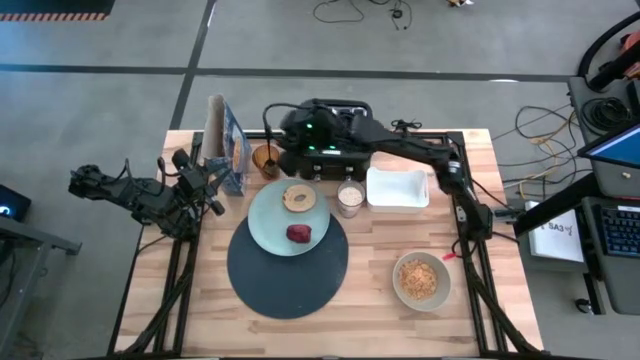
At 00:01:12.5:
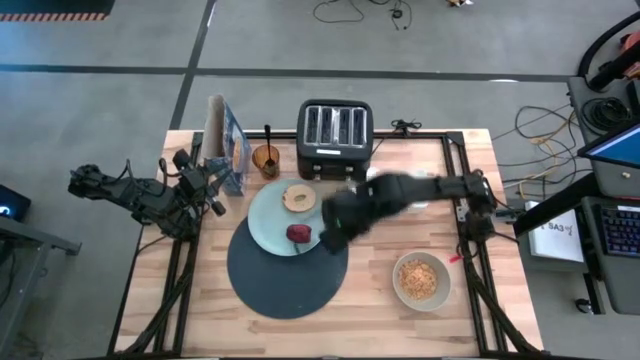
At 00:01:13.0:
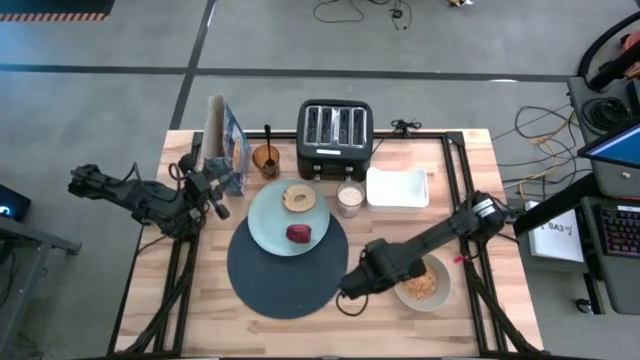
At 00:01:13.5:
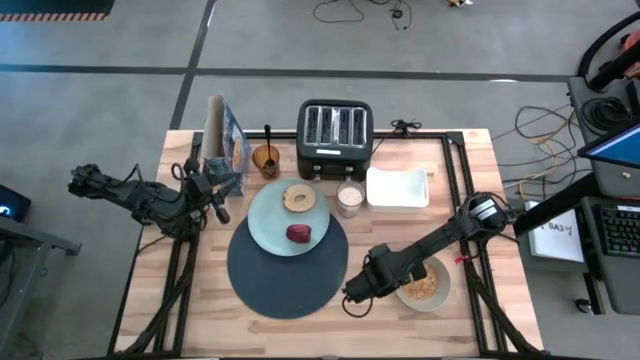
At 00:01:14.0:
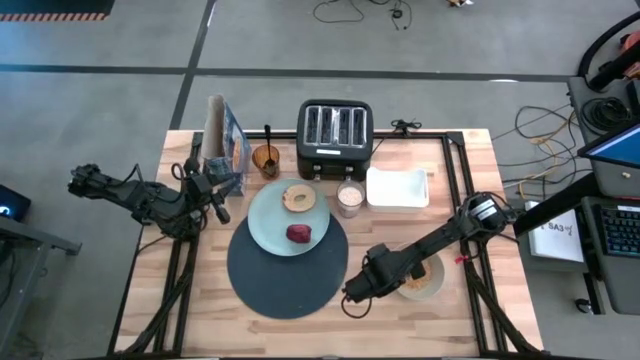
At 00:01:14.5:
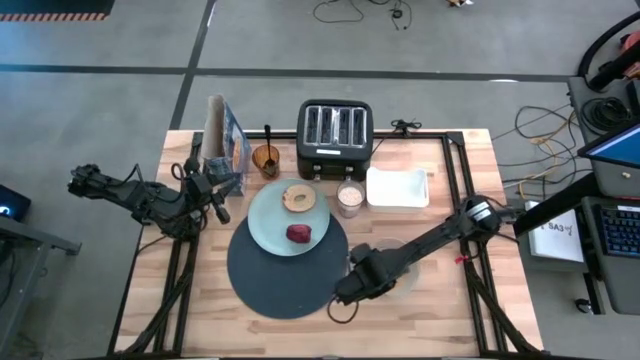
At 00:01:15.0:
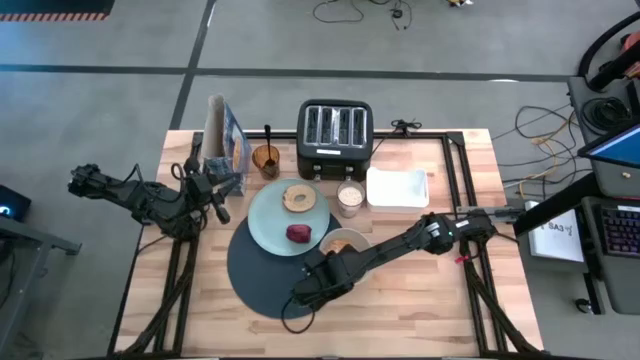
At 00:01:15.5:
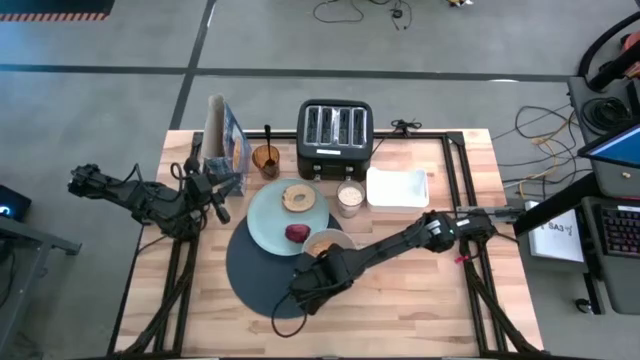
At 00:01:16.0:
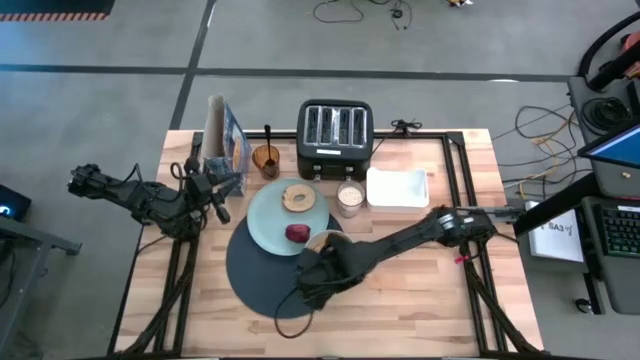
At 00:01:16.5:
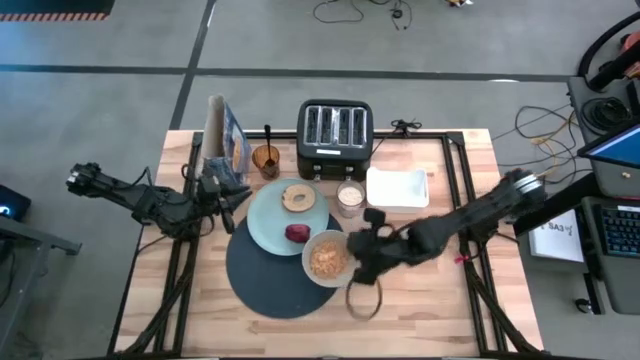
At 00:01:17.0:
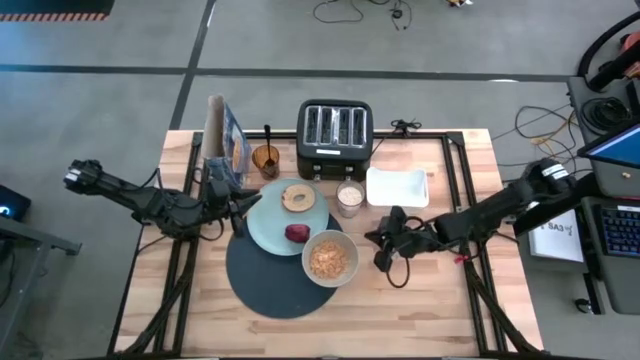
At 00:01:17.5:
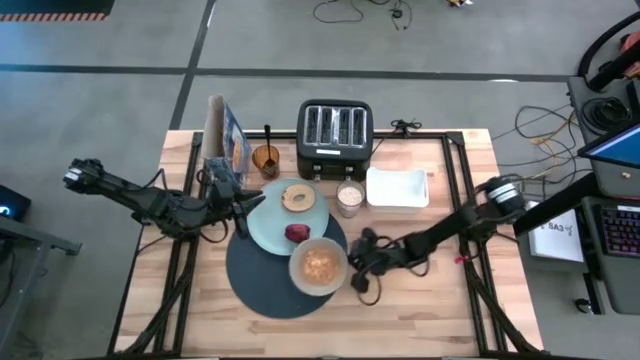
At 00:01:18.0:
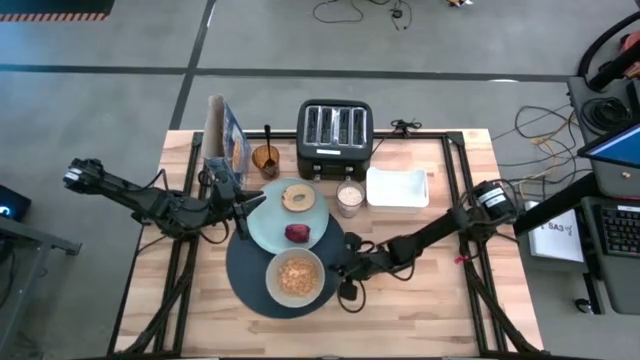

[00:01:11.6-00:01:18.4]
Task: Arrange a breakfast setting
Put the gray bowl on the blue table mat

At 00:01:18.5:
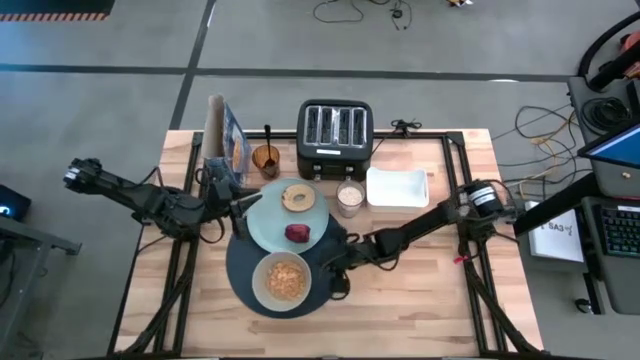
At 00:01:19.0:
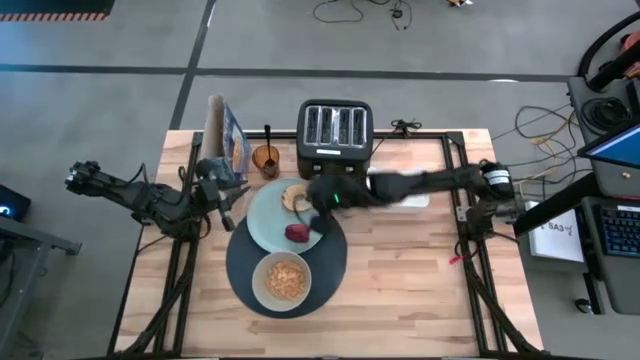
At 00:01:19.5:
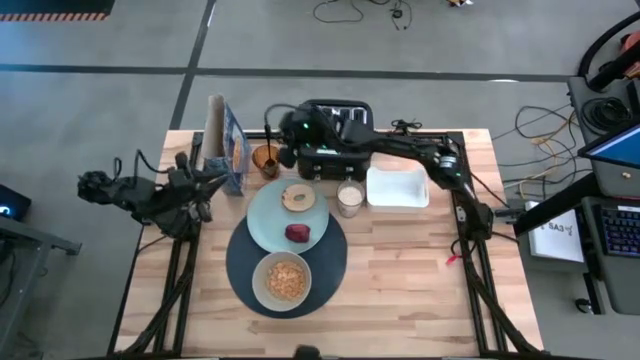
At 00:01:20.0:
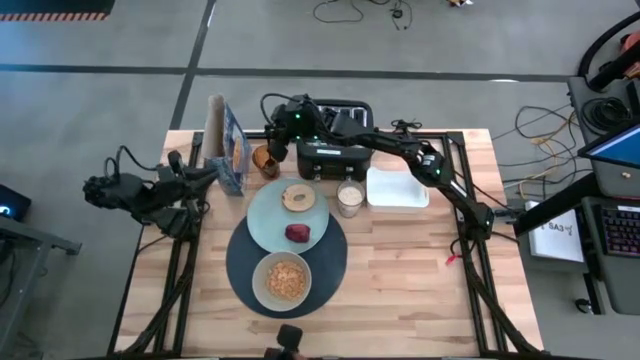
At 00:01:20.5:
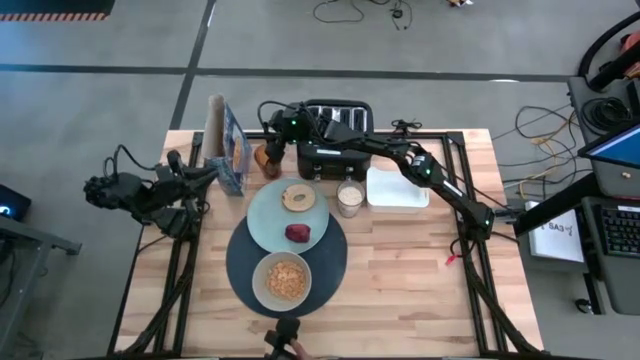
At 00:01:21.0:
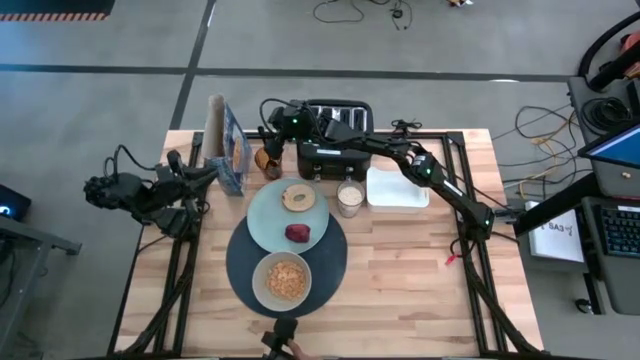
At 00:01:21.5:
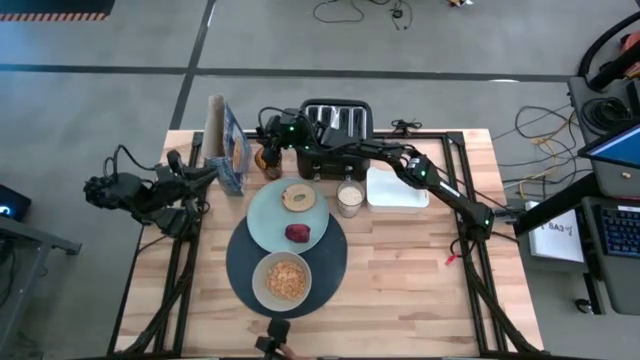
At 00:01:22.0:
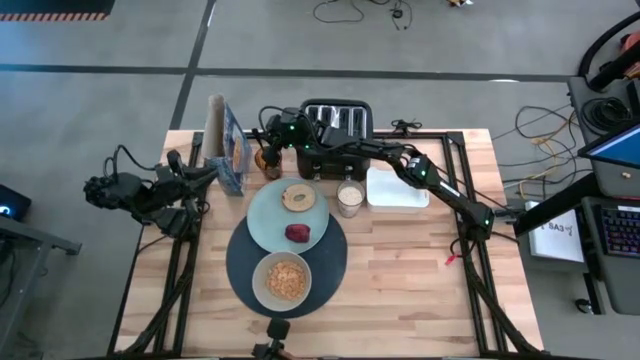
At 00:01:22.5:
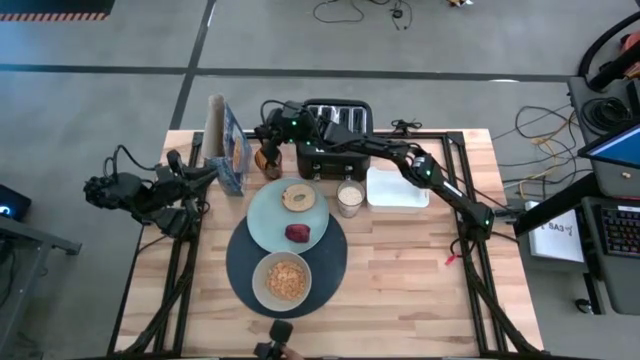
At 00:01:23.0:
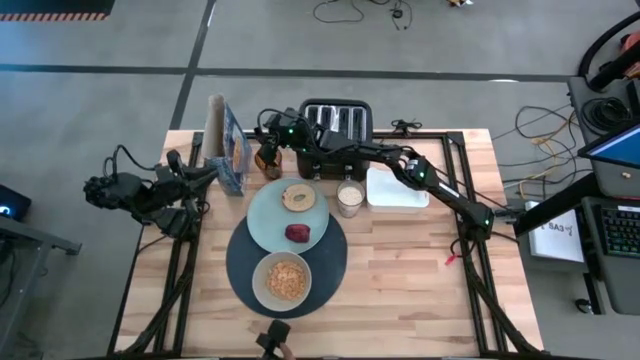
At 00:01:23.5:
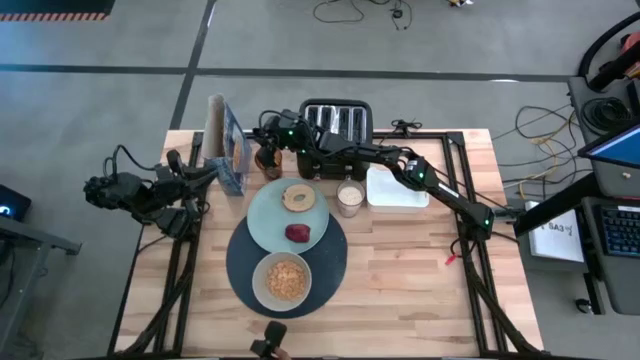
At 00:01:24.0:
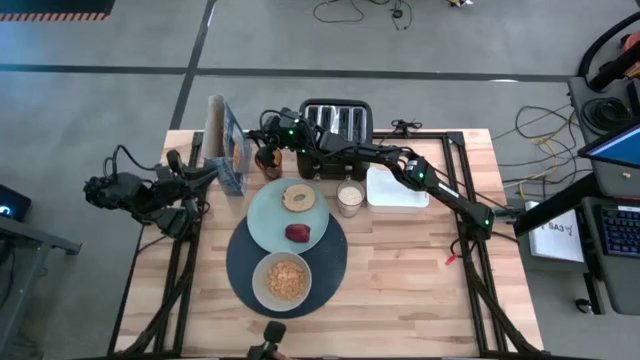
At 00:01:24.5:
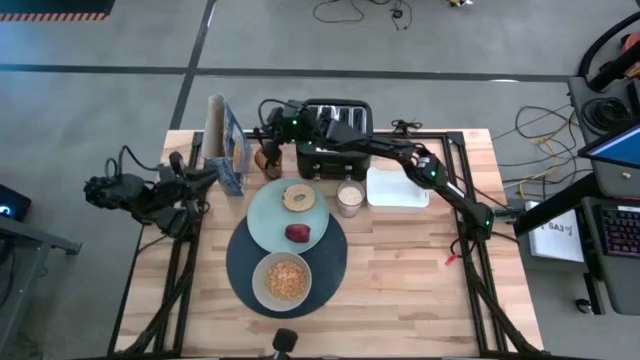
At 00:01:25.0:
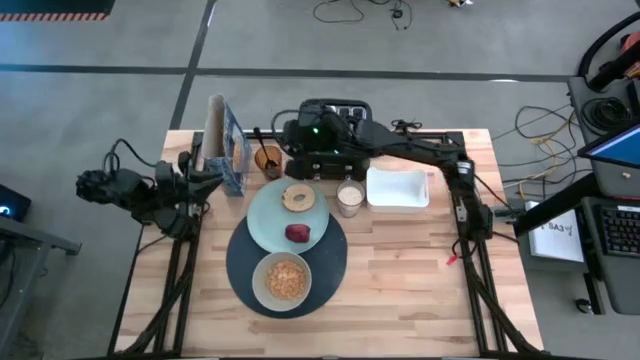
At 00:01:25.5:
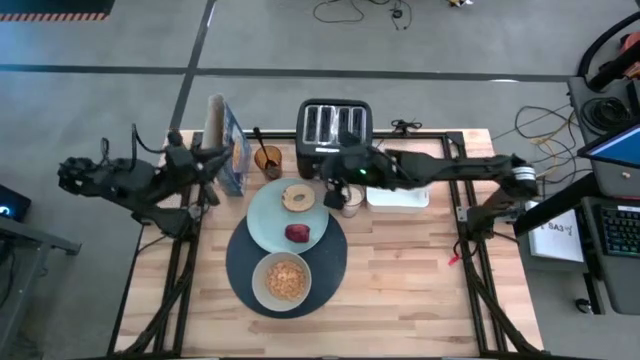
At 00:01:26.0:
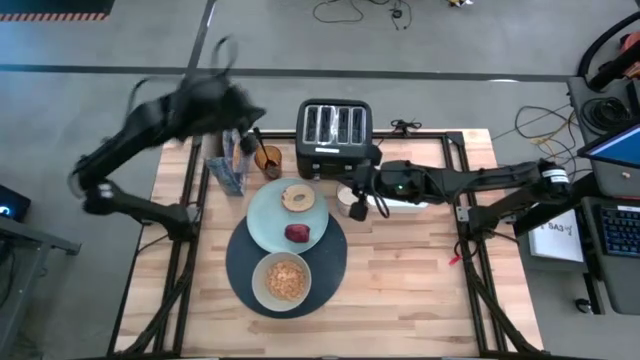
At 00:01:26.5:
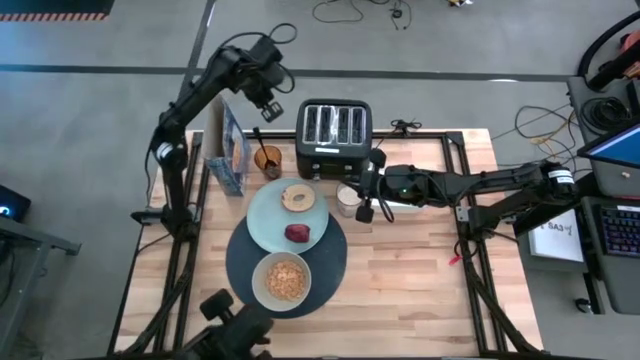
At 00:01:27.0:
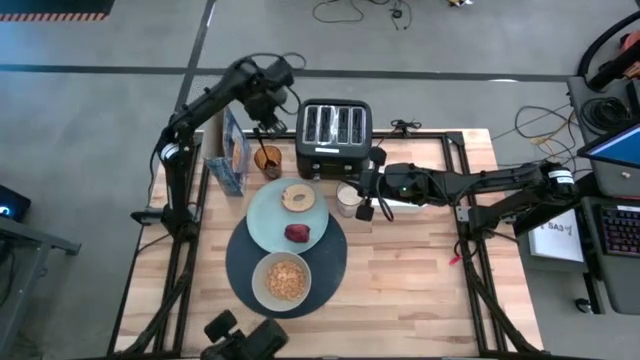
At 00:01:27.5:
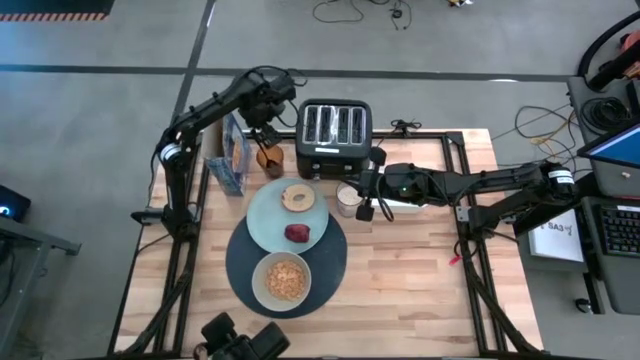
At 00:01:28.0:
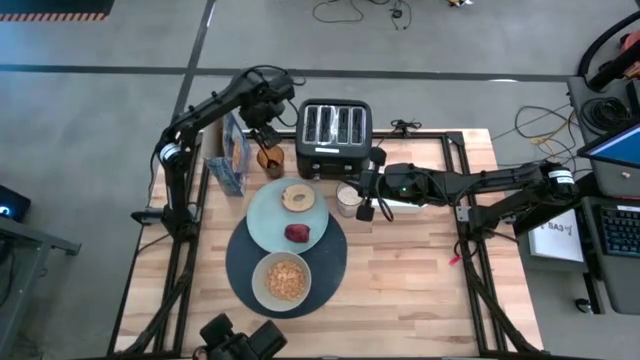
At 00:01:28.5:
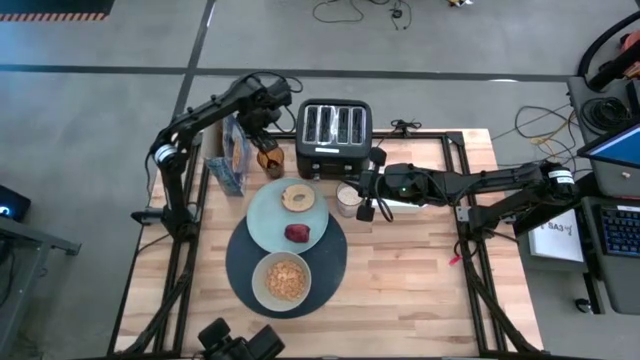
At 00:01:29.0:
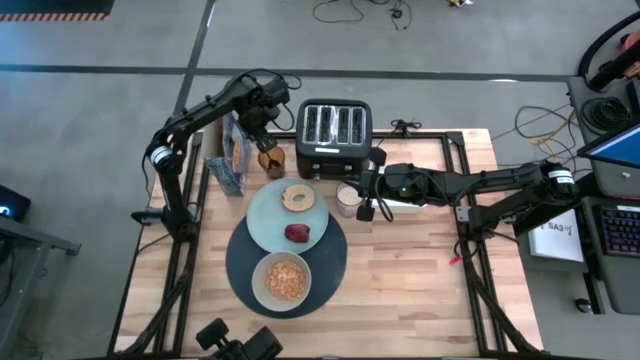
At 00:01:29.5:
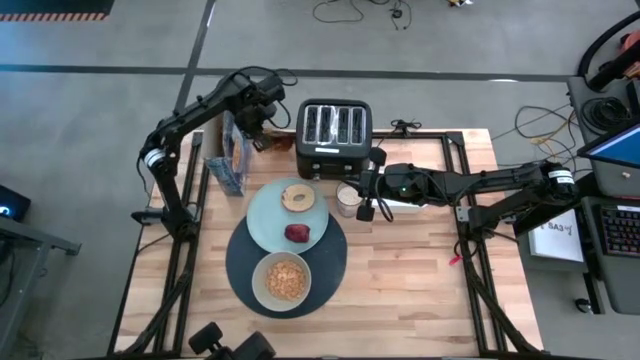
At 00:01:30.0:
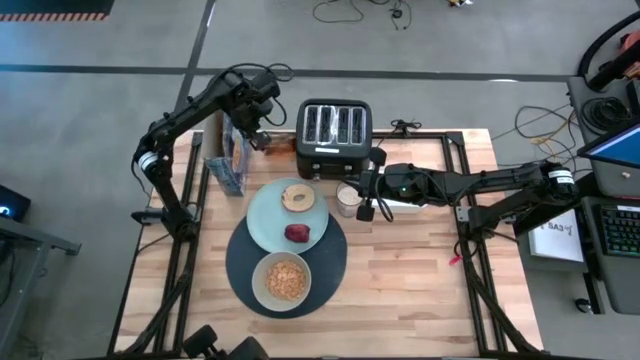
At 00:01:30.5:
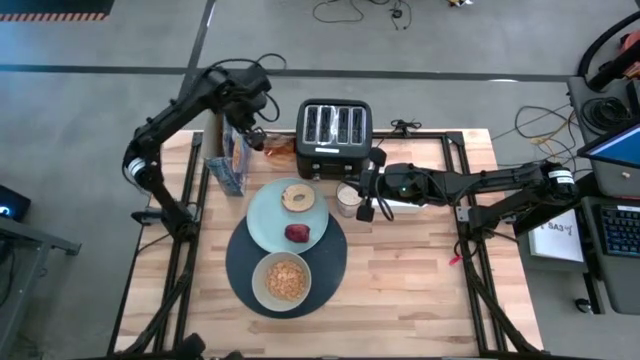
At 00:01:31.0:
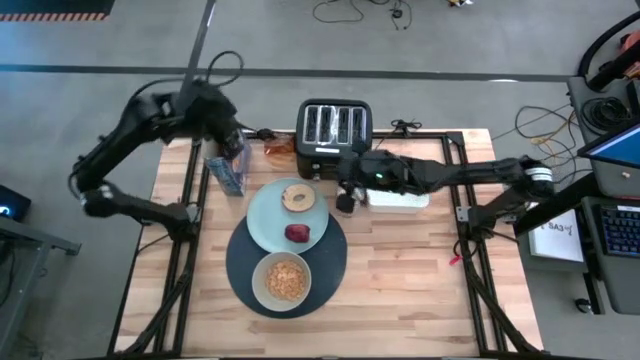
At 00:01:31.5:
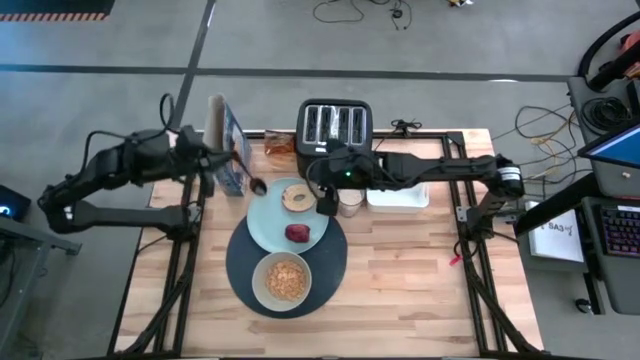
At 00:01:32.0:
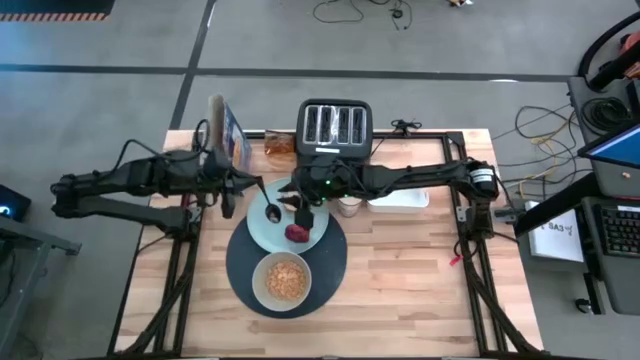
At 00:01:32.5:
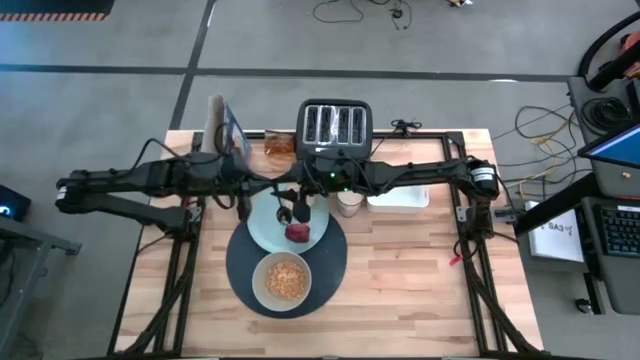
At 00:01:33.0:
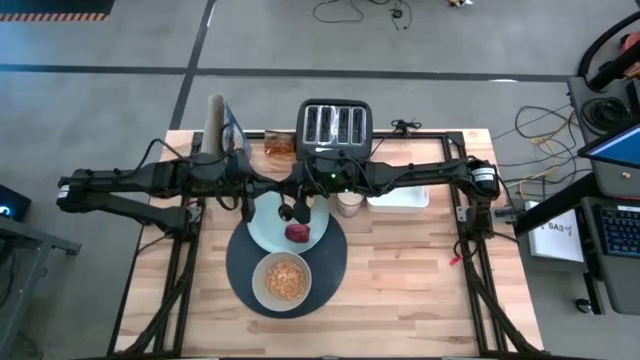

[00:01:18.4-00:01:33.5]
Put the black spoon on the blue table mat to the right of the gray bowl
